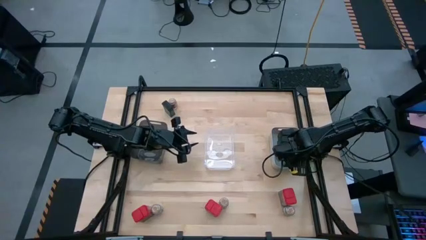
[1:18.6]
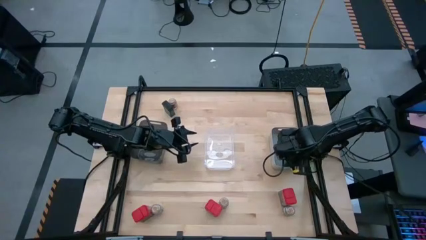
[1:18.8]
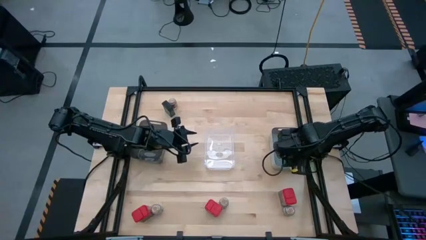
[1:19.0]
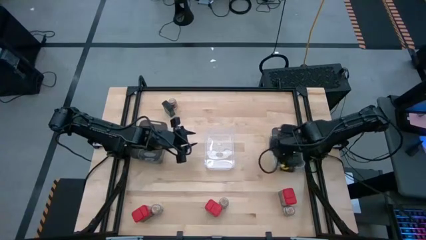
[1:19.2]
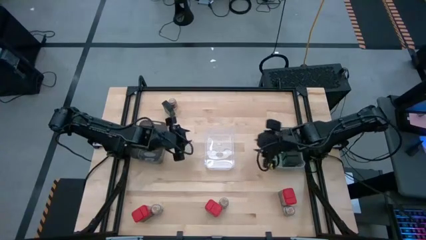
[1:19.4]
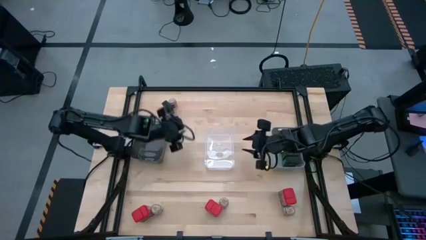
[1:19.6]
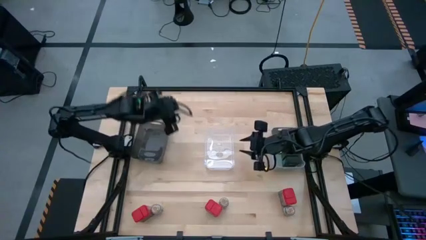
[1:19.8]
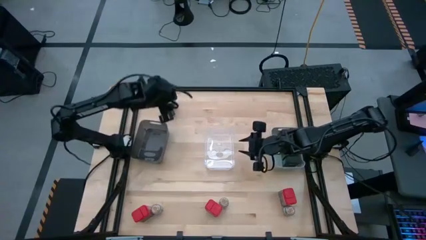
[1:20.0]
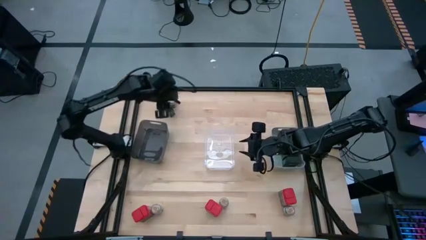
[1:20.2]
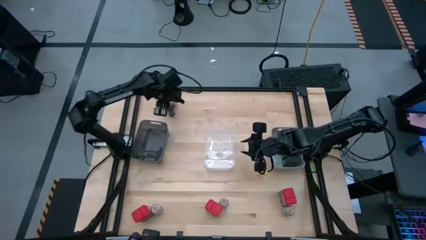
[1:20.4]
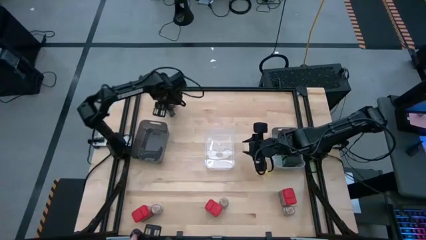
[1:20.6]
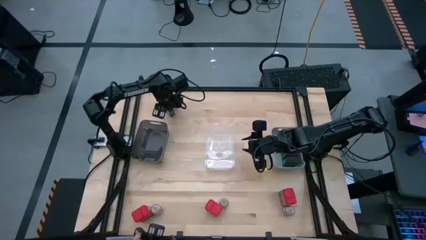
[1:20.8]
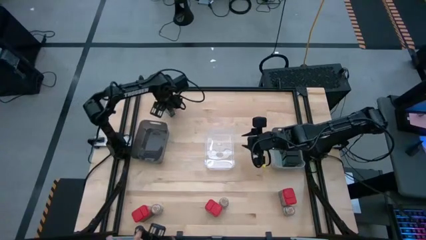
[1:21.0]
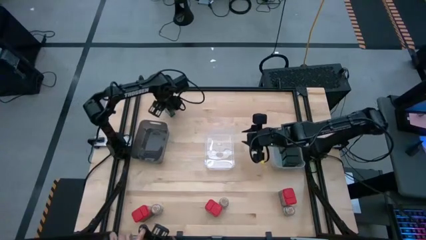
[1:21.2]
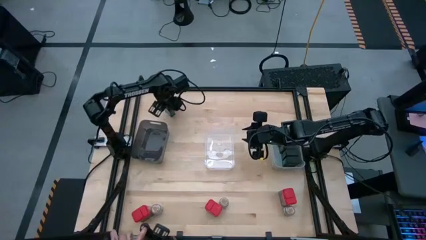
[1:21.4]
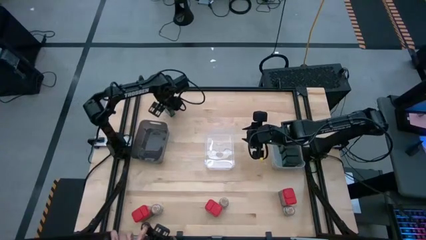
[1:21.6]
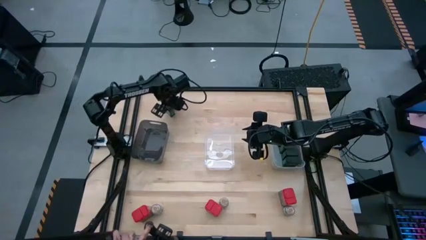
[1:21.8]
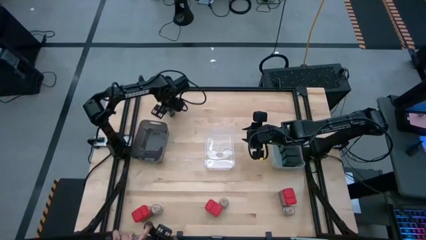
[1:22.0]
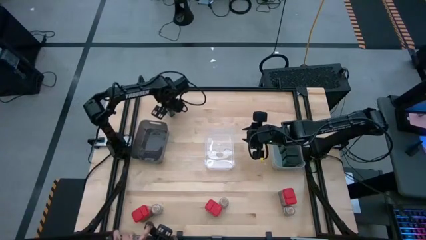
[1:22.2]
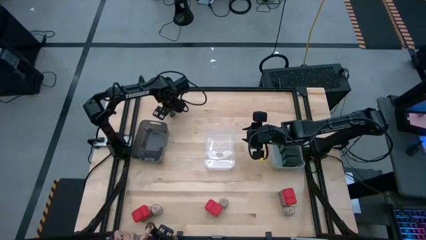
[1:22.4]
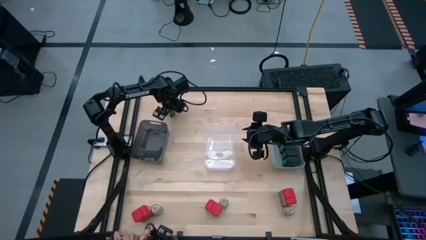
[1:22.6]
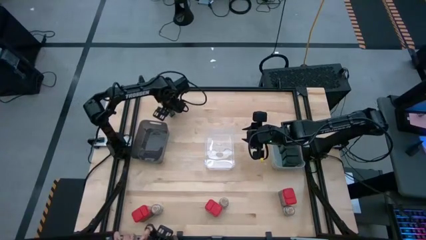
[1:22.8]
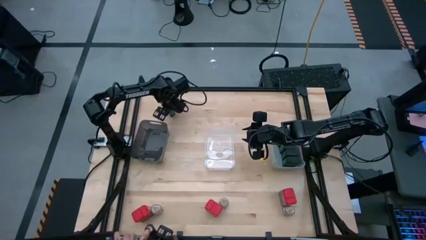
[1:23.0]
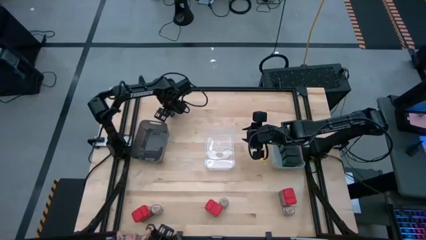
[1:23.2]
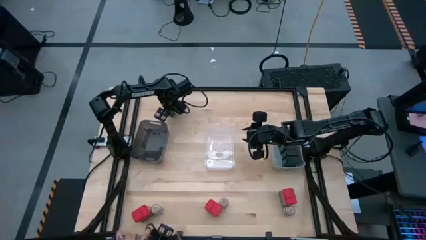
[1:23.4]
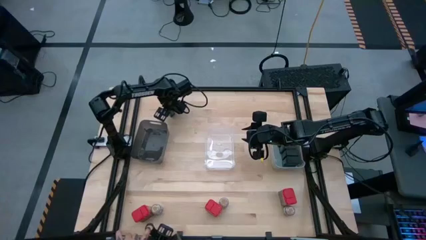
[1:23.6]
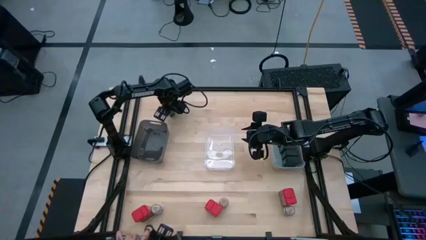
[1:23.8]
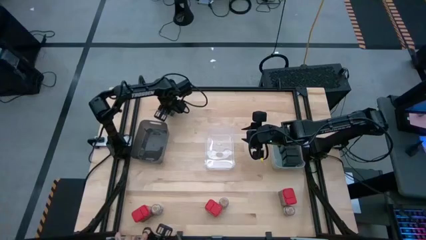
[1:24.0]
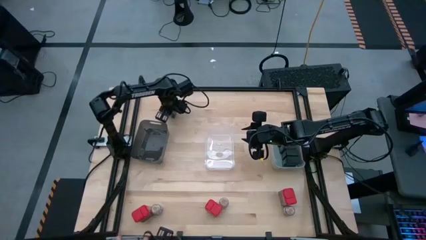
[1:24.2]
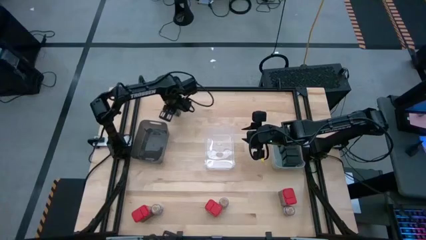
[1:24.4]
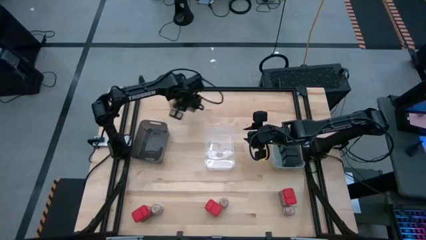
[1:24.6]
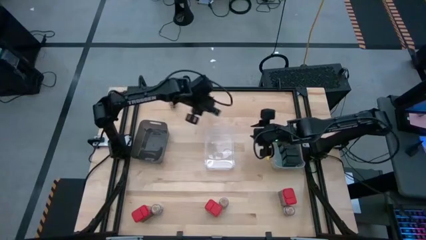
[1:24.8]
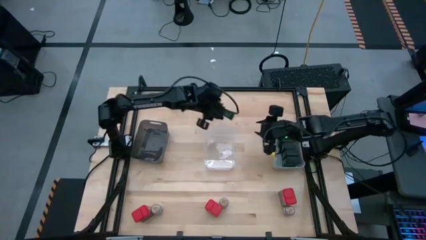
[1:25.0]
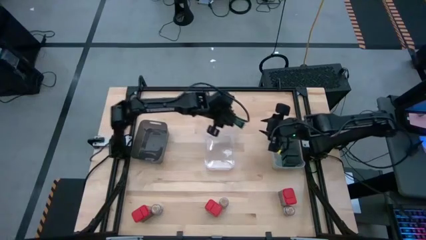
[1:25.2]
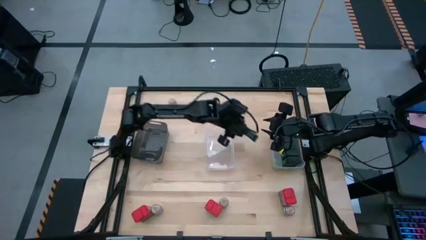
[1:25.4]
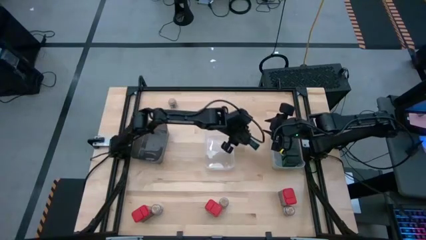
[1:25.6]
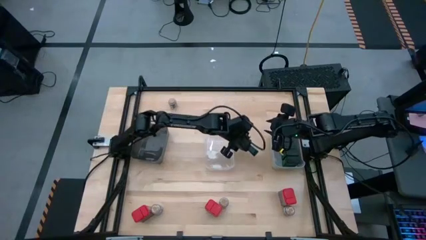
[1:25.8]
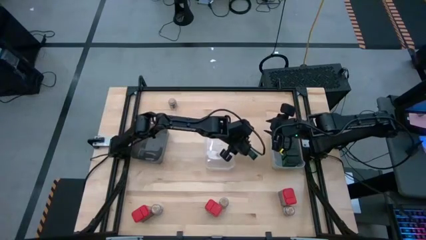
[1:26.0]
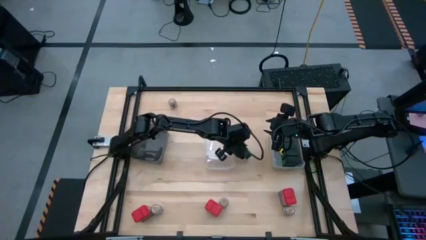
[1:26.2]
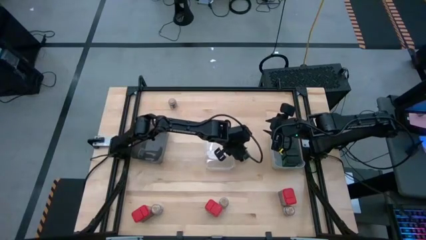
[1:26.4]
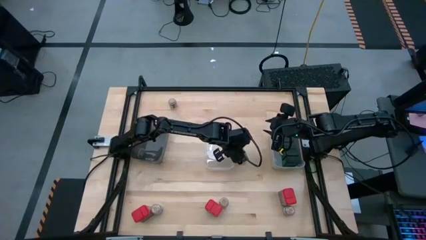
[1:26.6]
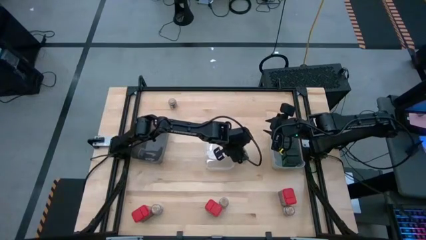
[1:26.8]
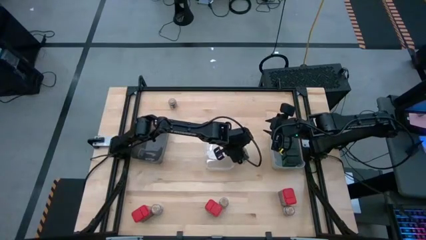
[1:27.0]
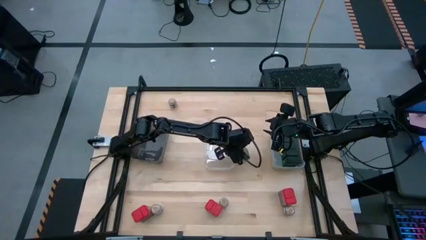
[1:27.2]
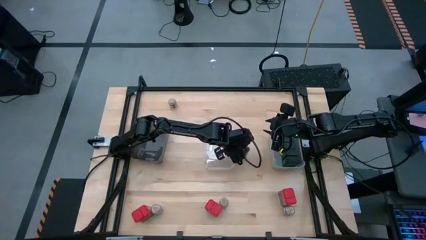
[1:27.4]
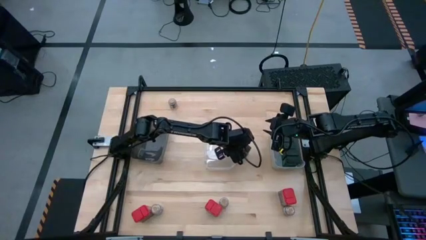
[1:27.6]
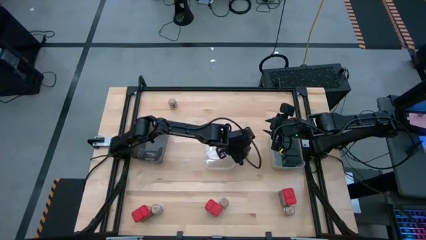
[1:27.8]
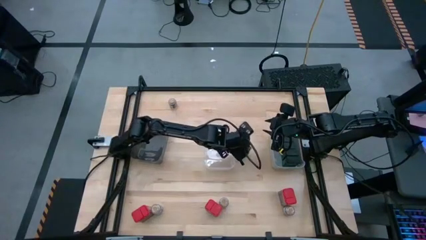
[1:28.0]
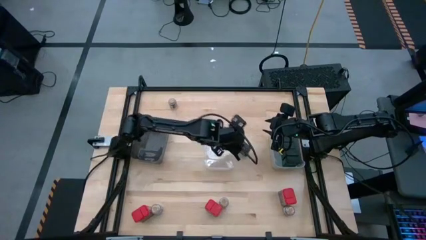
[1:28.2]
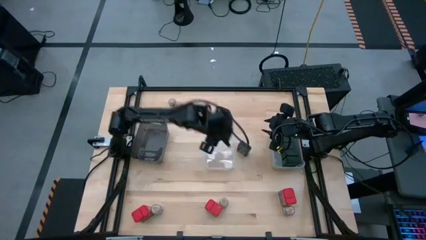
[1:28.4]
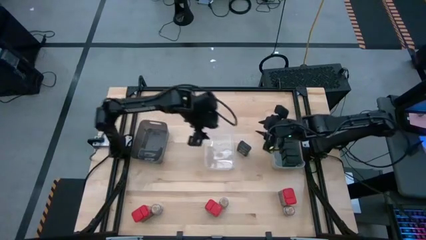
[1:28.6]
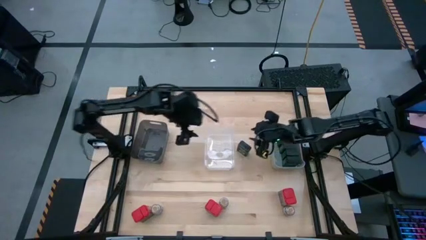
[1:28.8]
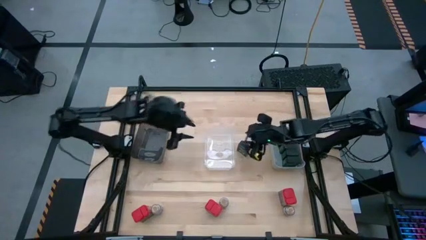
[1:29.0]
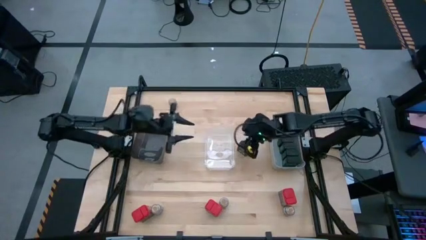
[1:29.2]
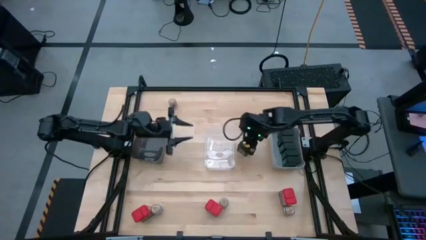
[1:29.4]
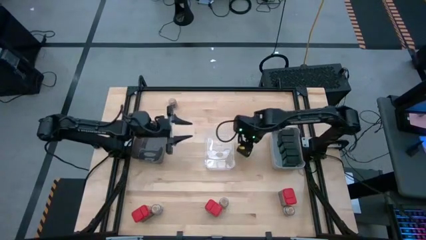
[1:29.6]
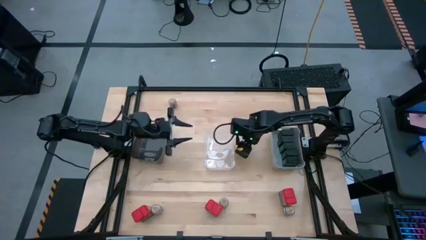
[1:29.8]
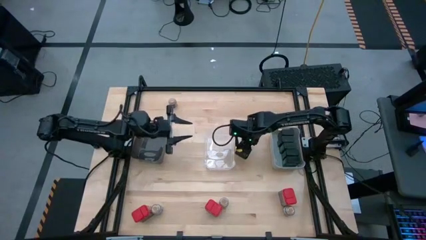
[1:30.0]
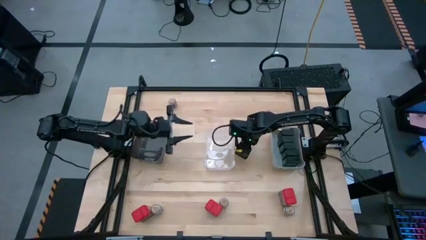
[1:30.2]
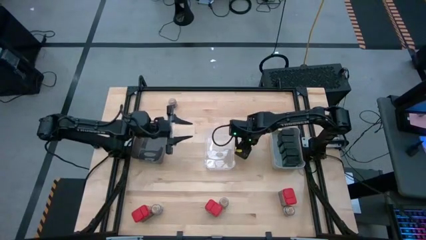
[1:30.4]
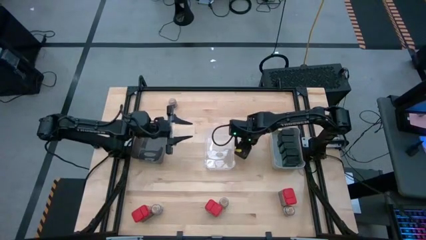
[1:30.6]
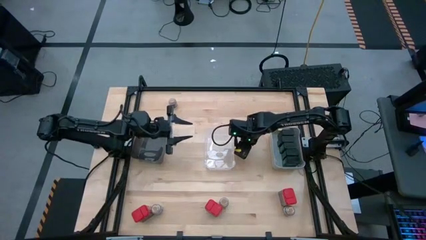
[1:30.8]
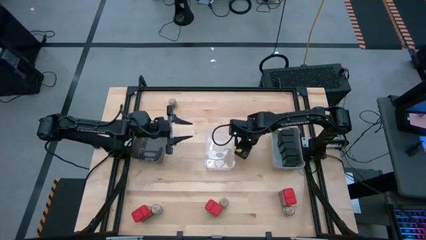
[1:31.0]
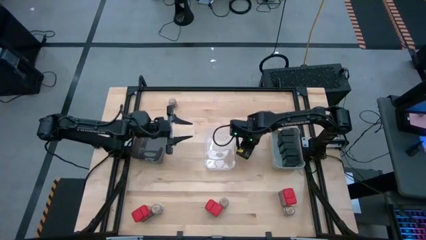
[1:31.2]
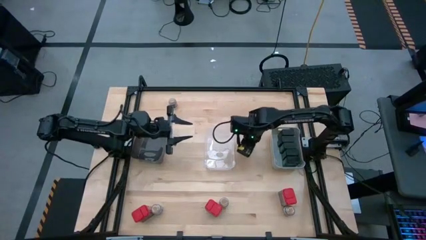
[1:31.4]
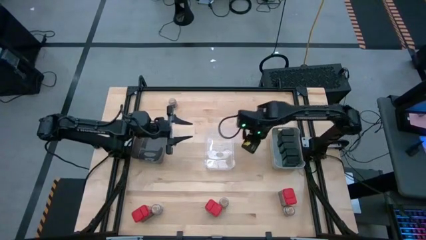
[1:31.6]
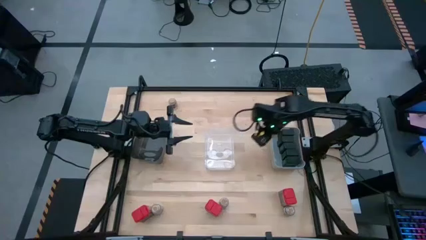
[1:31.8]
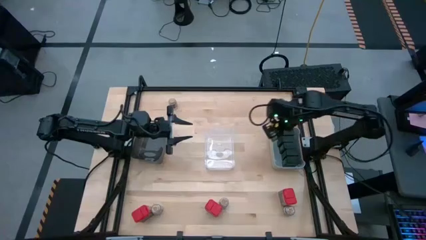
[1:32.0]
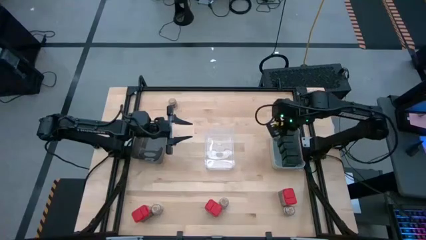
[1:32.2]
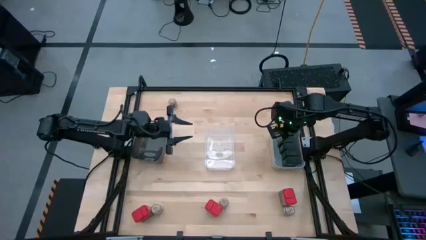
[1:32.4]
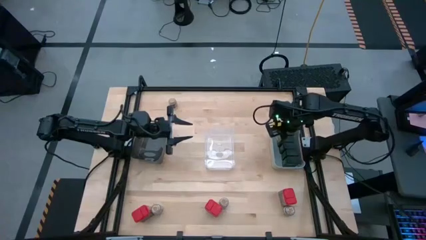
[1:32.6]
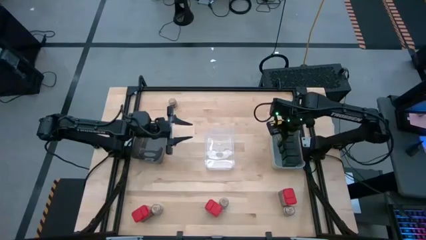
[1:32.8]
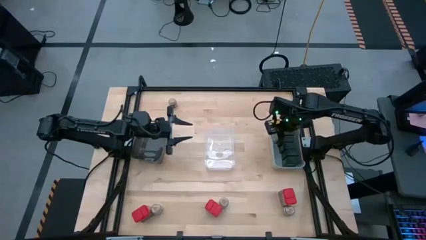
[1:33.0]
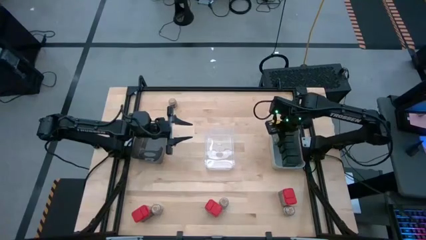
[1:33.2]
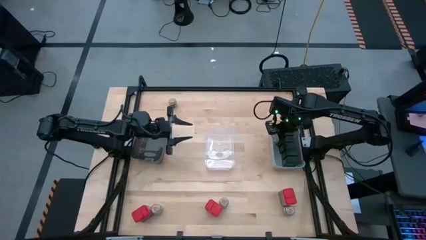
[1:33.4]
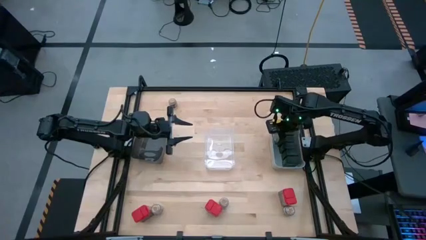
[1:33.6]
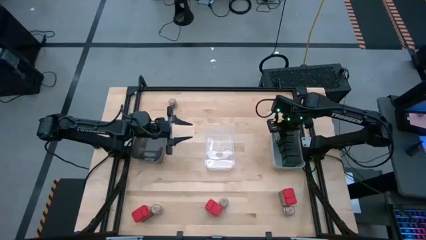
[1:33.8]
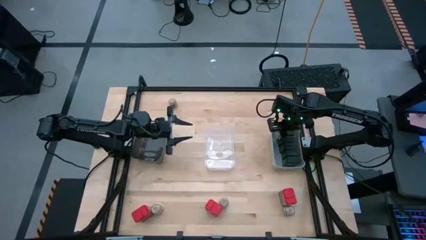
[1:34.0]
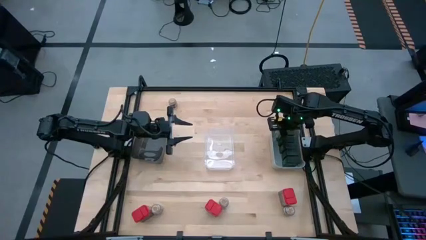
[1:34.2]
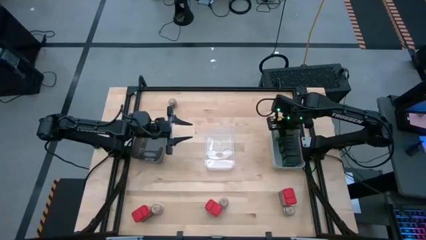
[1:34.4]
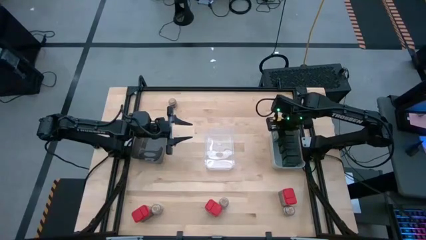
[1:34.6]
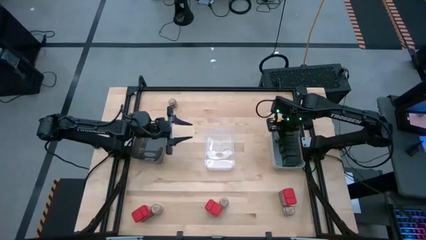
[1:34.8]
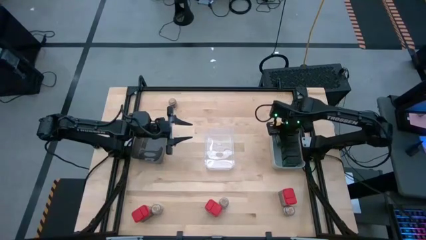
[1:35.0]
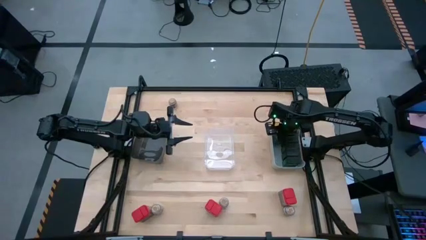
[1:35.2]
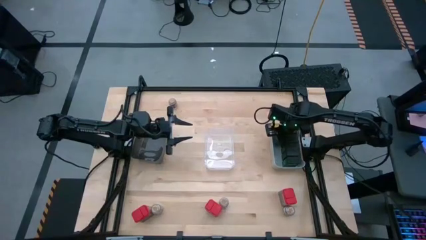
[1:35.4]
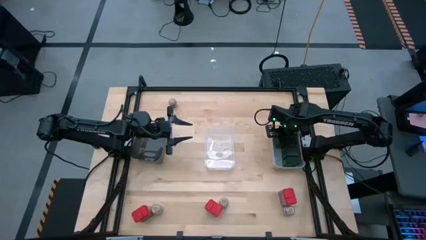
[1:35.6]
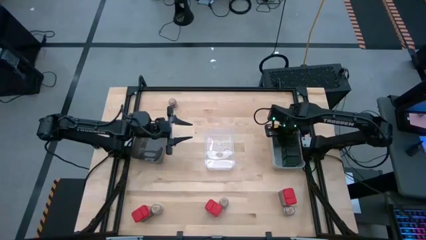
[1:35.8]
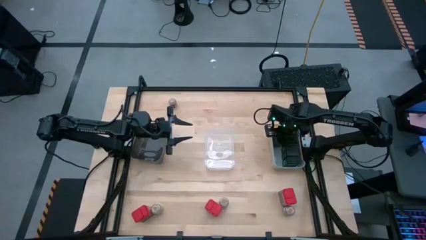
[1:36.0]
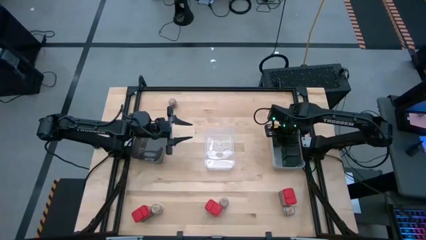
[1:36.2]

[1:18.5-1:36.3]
Task: Sort spices by type
Put the black seasoning can into the gray bin
